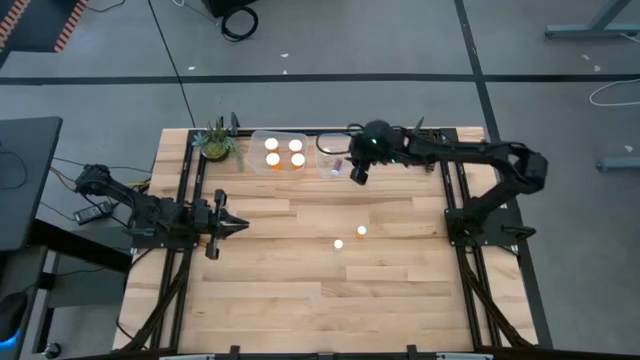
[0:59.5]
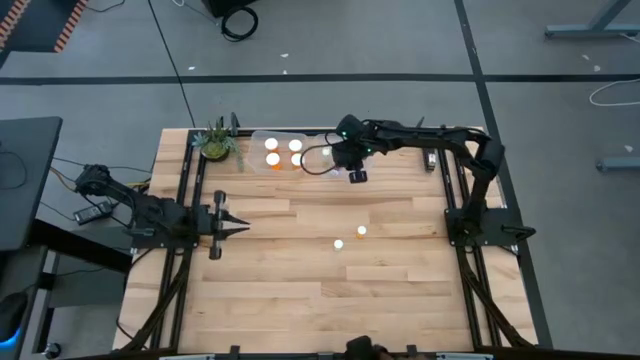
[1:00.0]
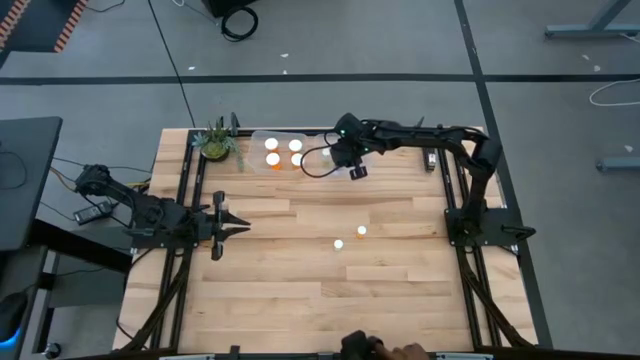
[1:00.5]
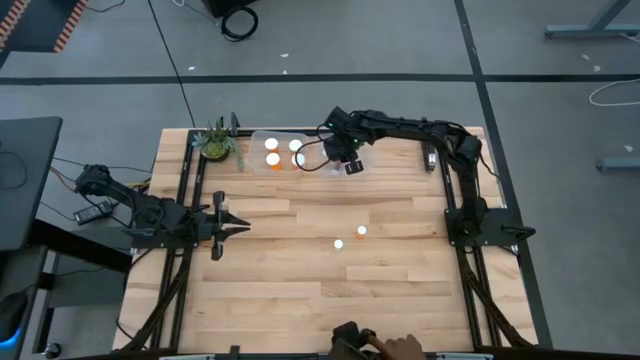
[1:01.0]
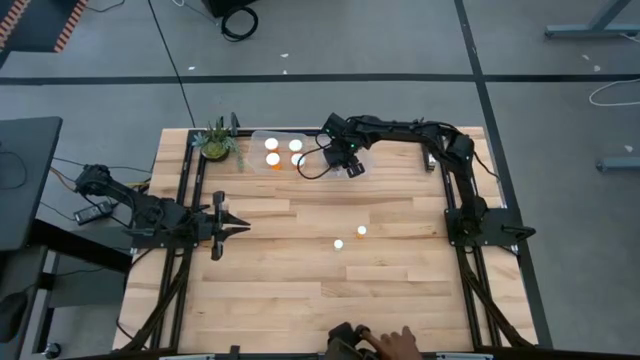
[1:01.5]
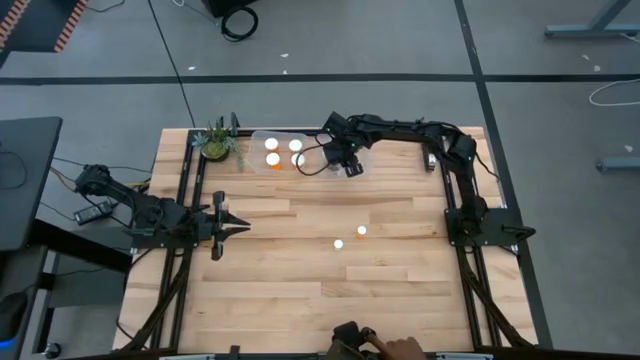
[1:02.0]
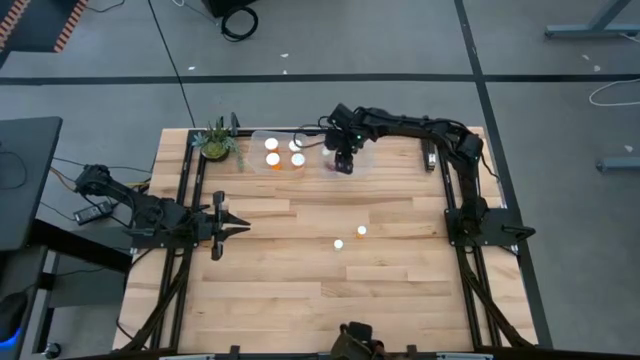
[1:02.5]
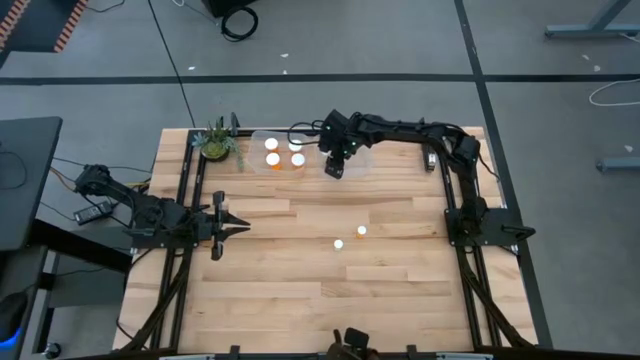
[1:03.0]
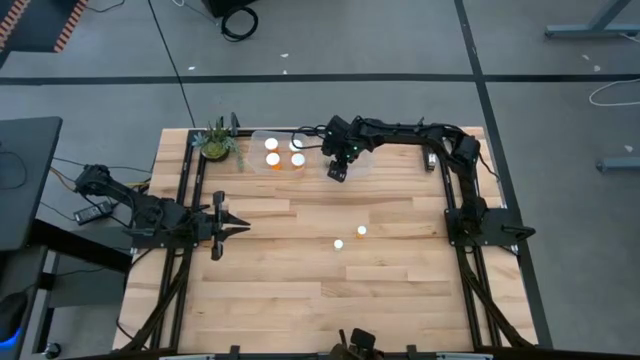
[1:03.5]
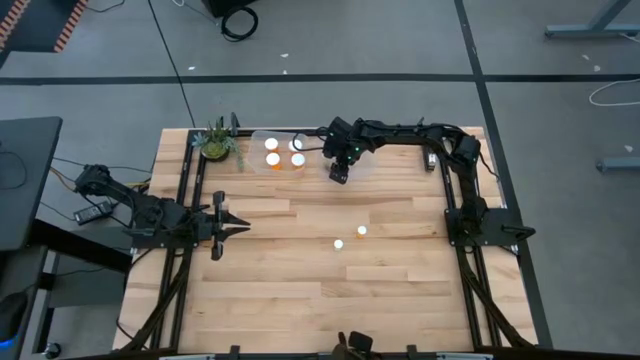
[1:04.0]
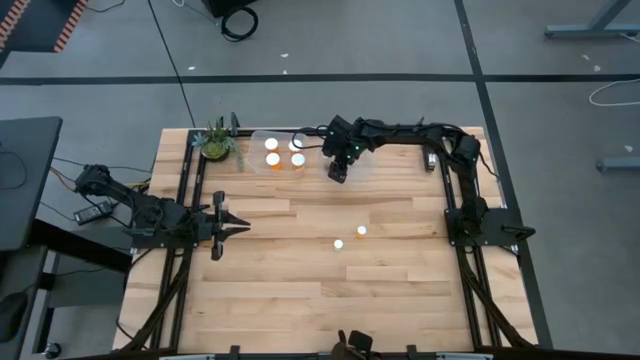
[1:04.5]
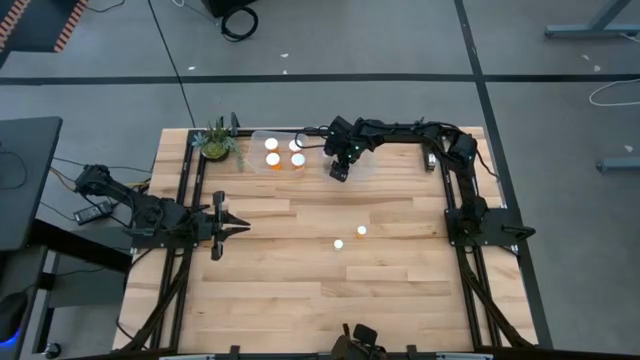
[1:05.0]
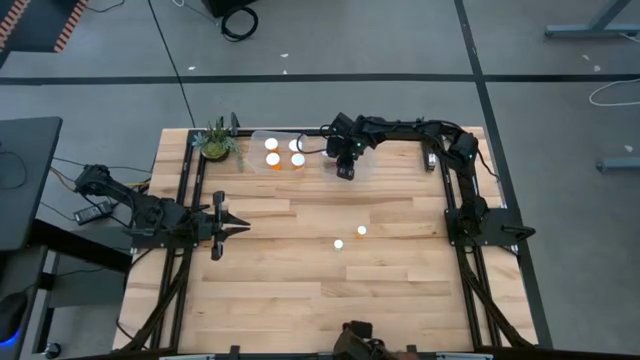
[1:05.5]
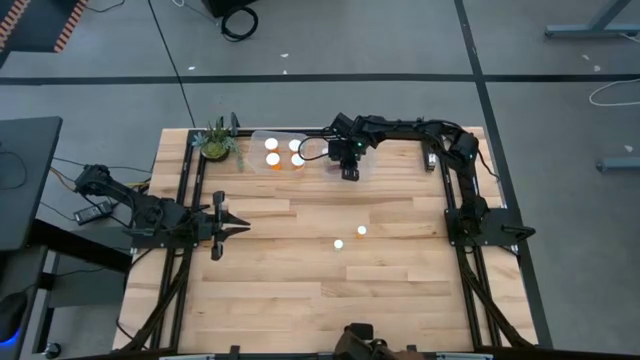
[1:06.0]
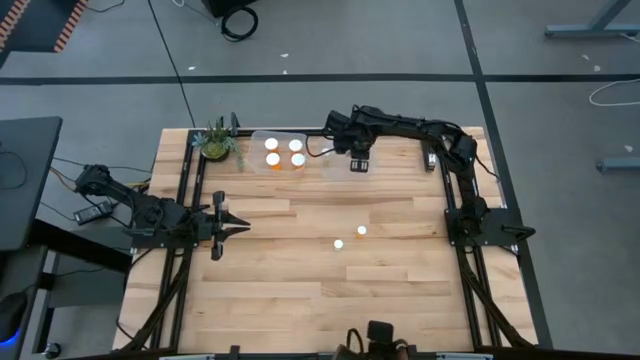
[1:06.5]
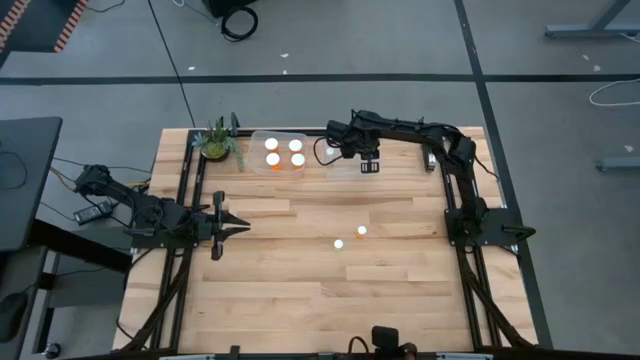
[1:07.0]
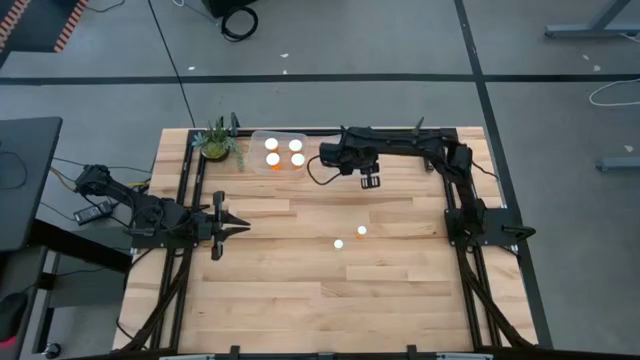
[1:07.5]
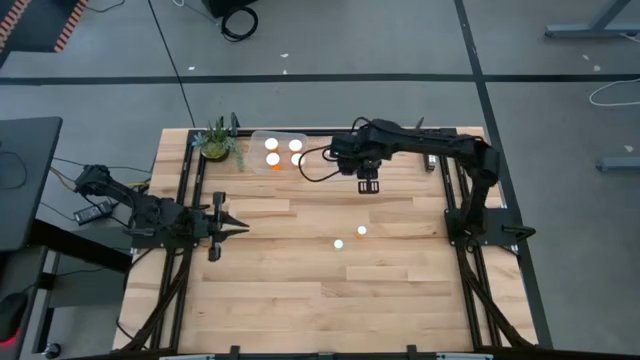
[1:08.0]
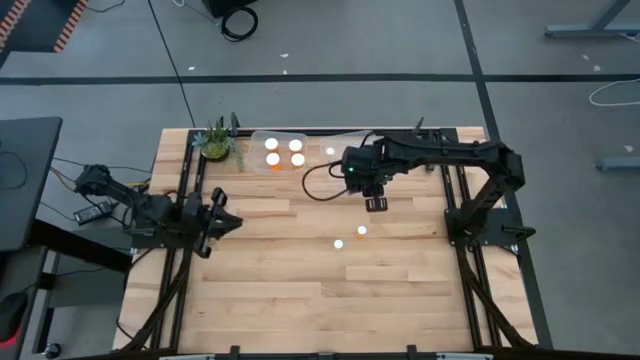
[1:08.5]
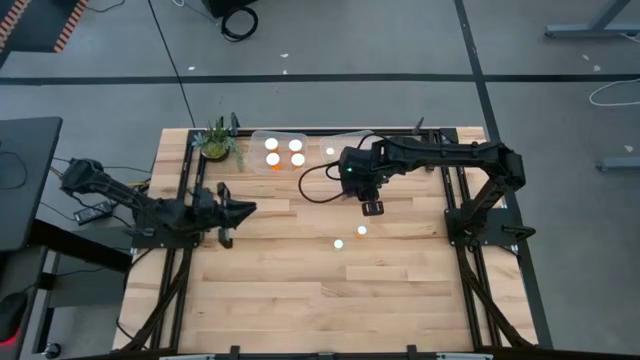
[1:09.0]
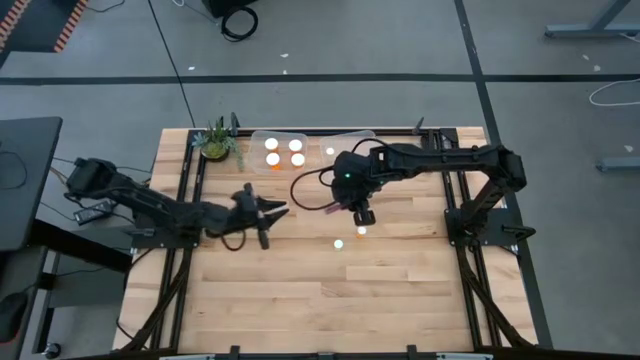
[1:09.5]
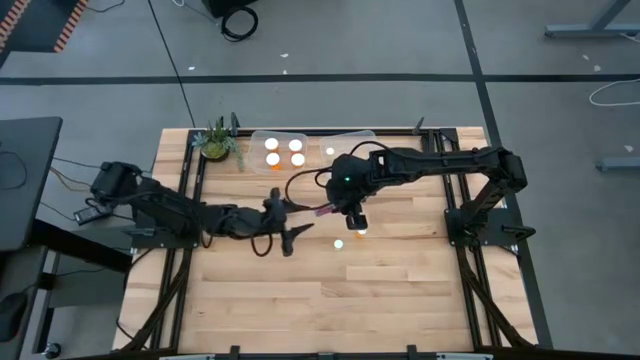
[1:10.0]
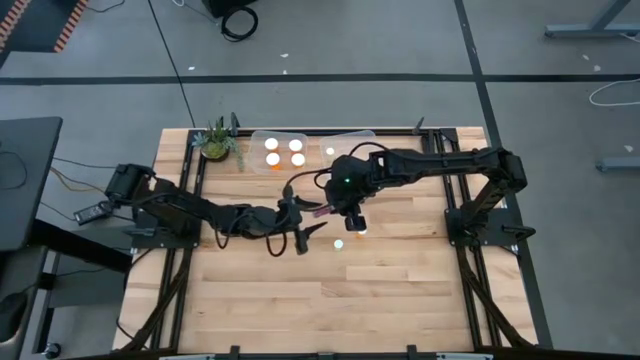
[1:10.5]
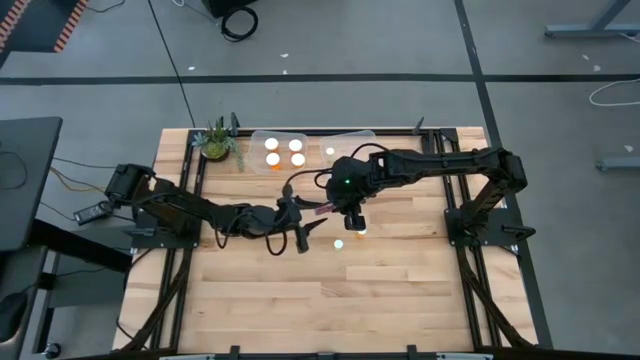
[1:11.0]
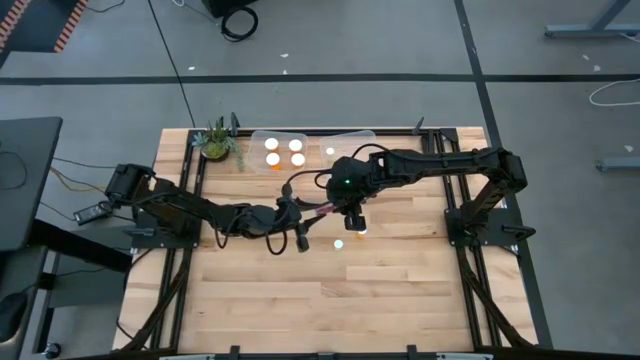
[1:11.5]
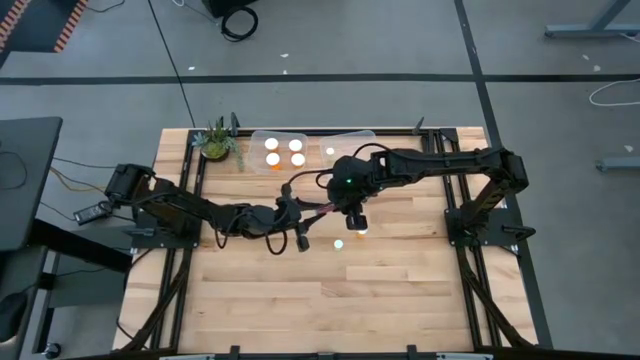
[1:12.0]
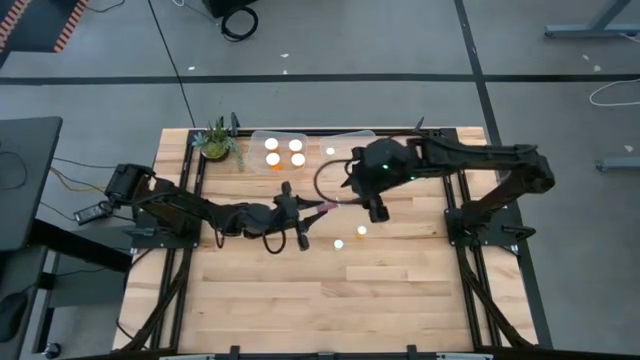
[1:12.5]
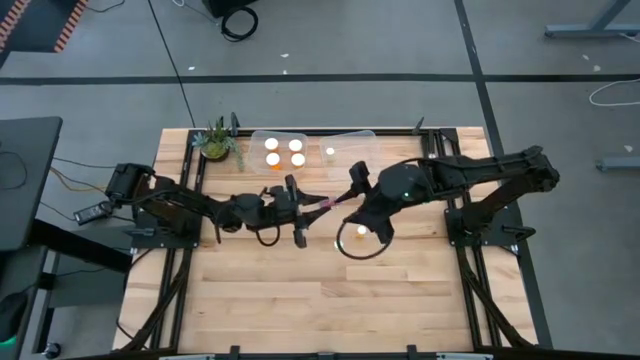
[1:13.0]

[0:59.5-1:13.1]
Task: Pick and place medicine bottles into bin by pill shape (circle, oval)
Put the small blue pill bottle into the right bin

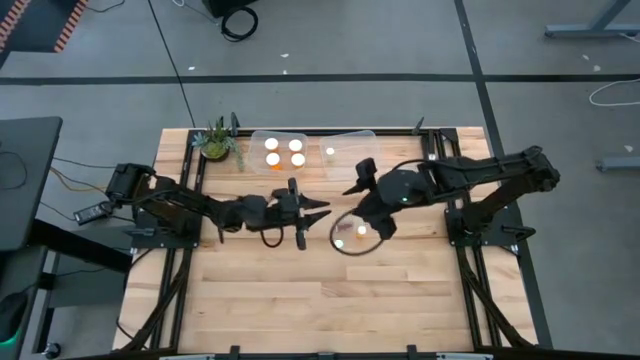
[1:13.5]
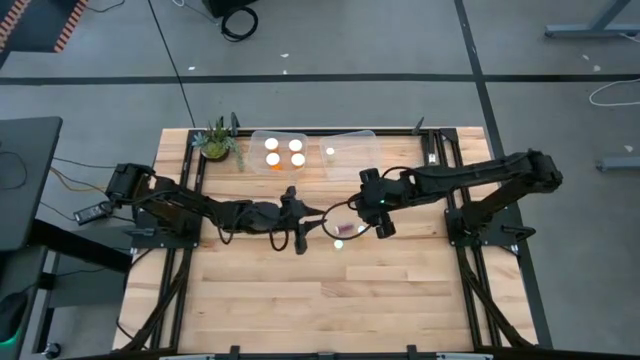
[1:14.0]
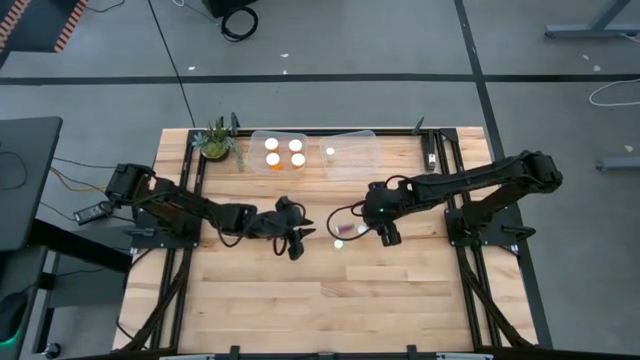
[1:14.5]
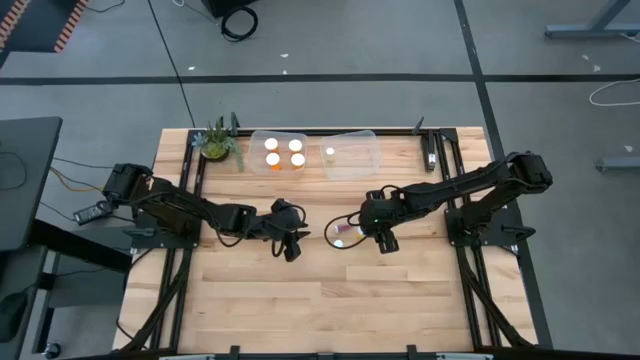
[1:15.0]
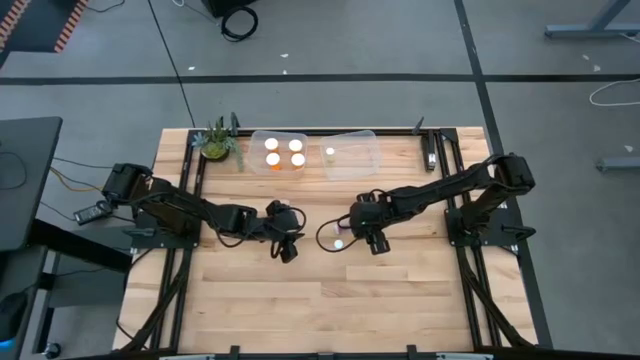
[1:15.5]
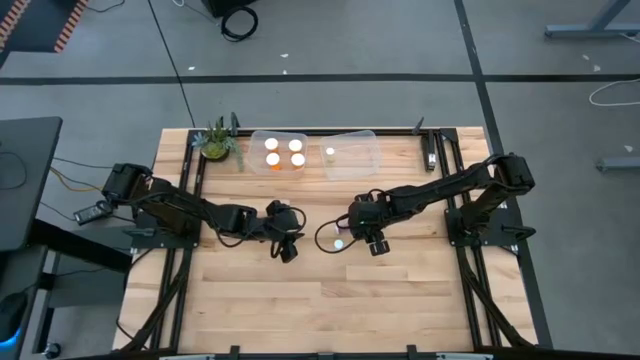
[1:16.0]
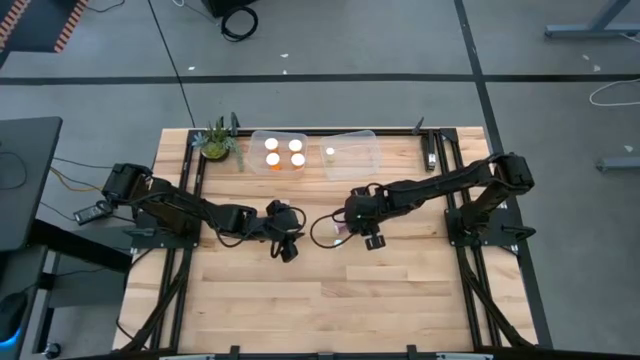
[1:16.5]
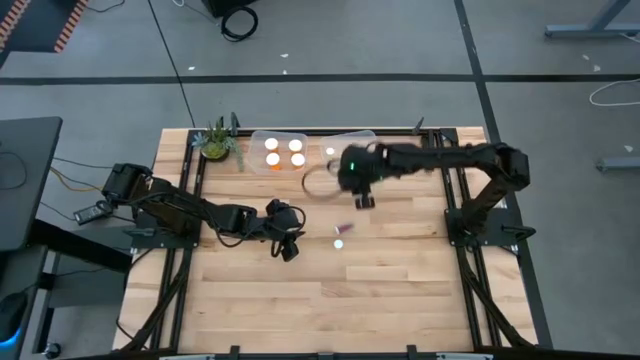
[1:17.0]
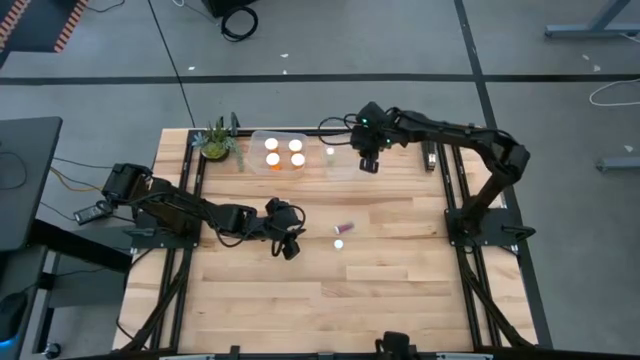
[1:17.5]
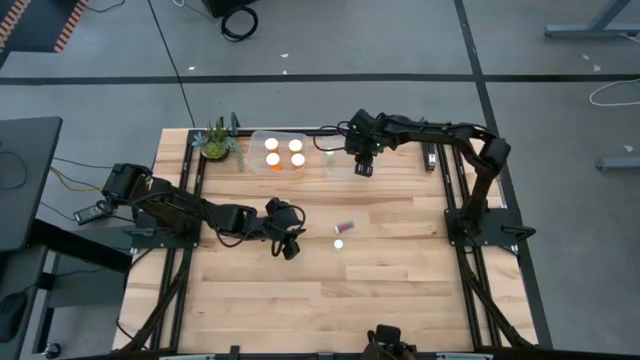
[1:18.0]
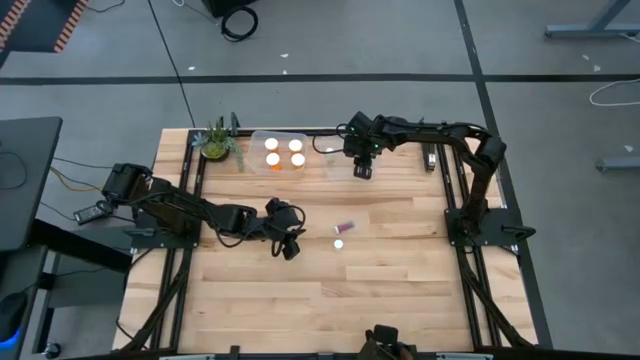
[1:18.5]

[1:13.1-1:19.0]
Put the small orange pill bottle into the right bin

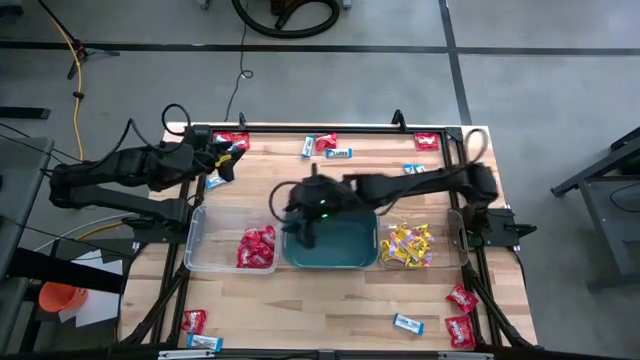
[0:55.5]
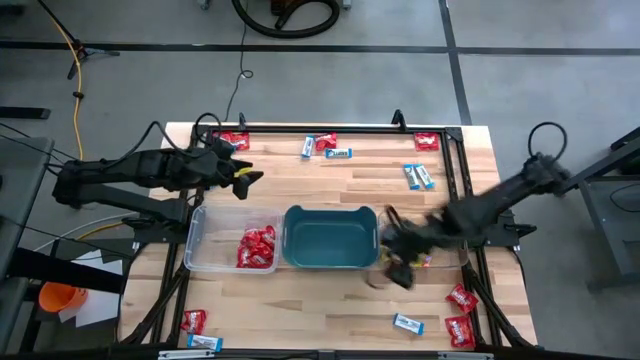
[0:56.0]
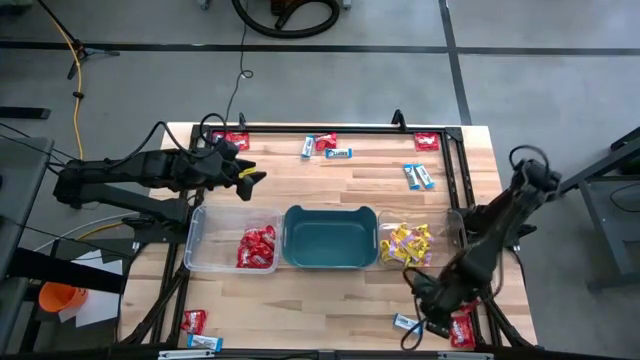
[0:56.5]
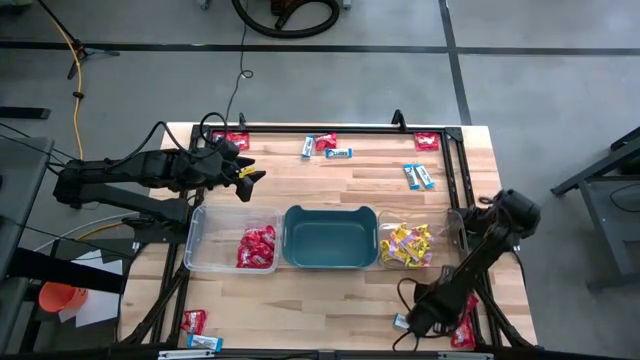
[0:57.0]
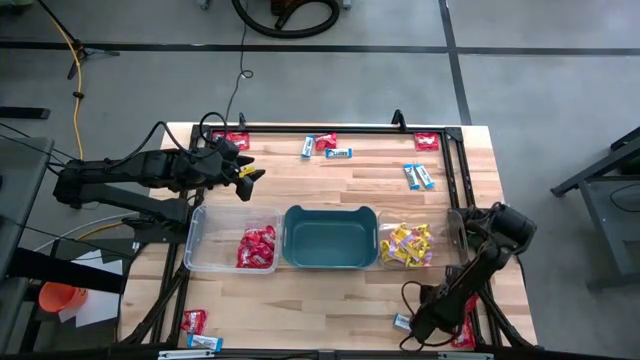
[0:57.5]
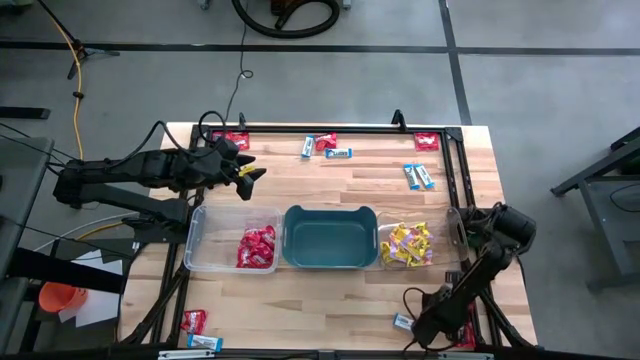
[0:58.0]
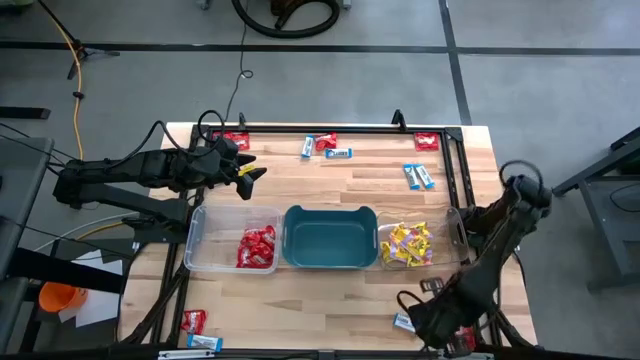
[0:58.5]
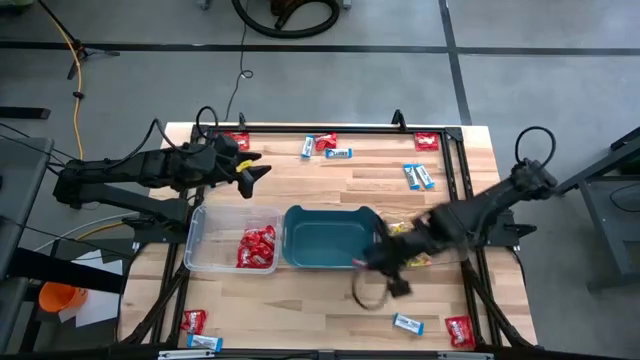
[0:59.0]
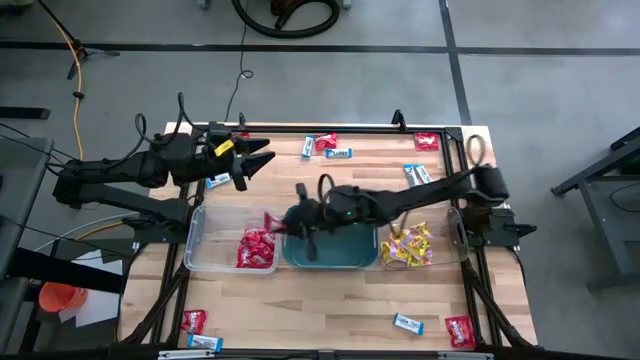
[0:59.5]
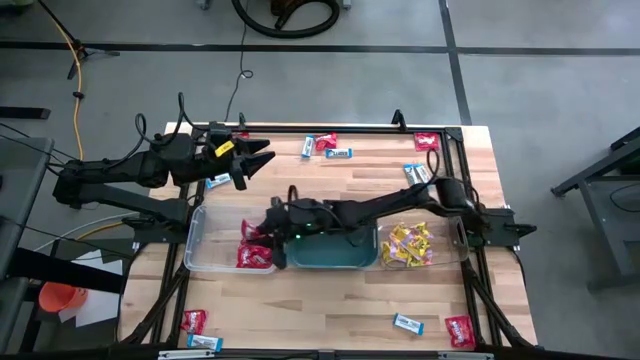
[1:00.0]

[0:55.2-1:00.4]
Task: Sort candy
Put the red candy into the left transparent bin
